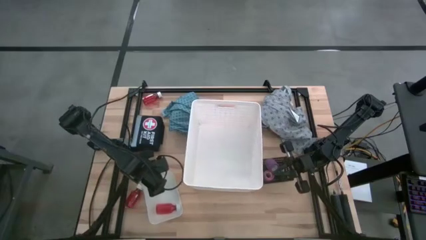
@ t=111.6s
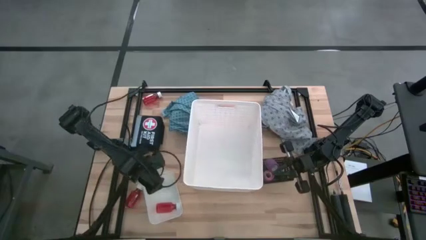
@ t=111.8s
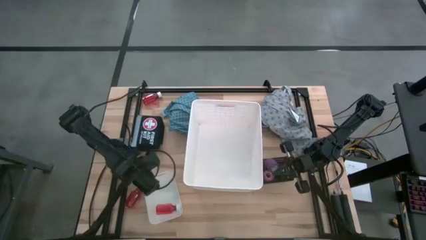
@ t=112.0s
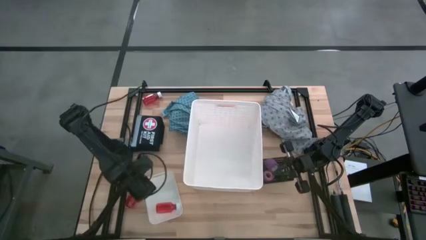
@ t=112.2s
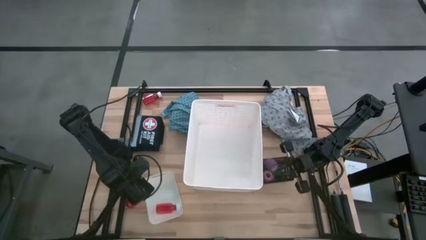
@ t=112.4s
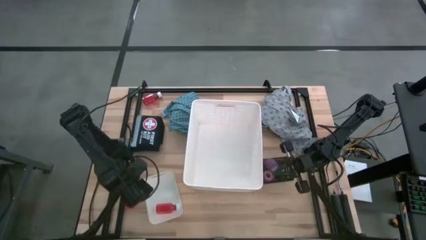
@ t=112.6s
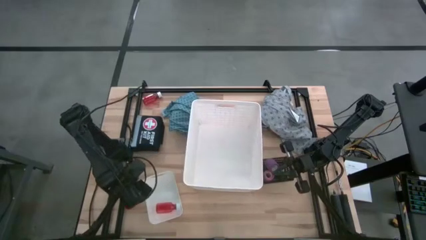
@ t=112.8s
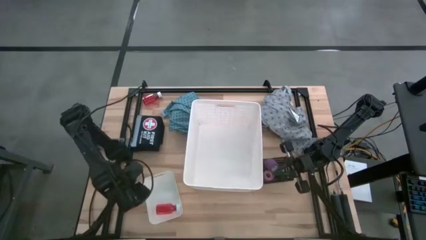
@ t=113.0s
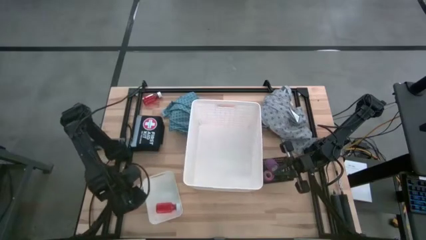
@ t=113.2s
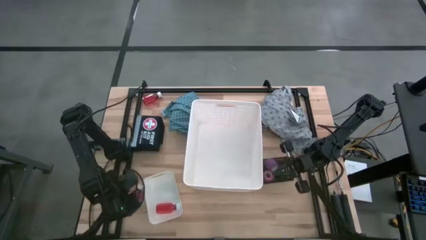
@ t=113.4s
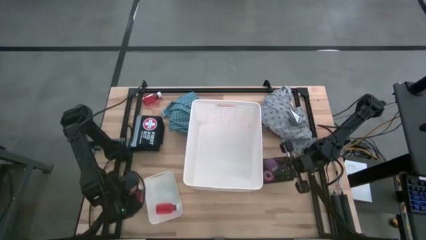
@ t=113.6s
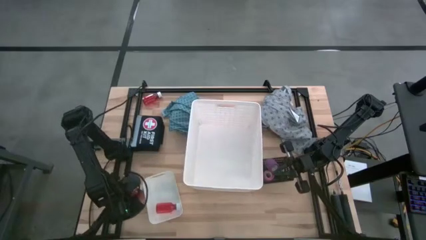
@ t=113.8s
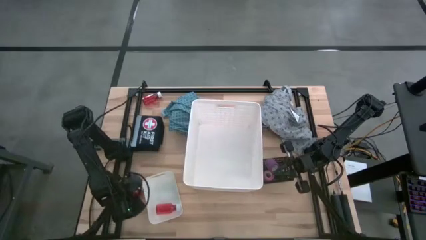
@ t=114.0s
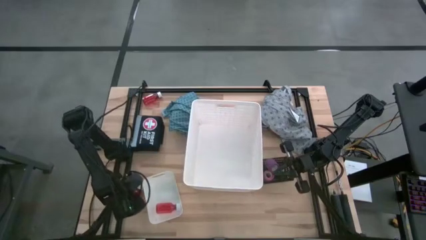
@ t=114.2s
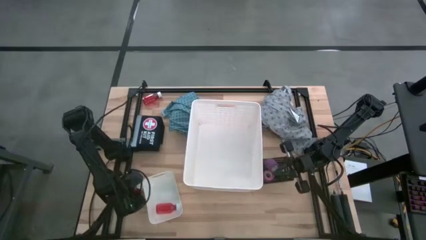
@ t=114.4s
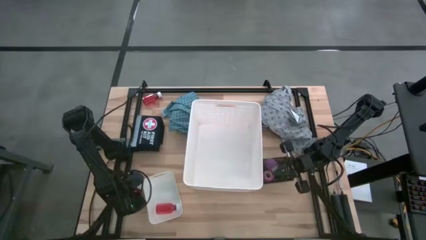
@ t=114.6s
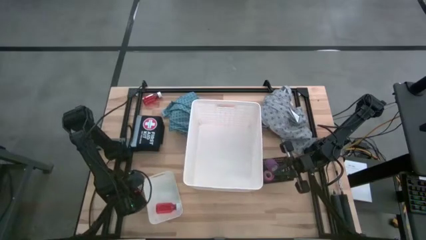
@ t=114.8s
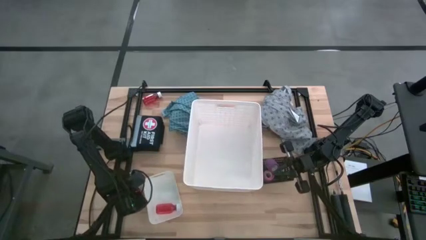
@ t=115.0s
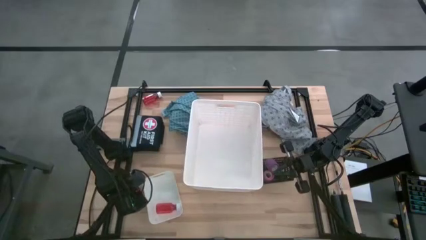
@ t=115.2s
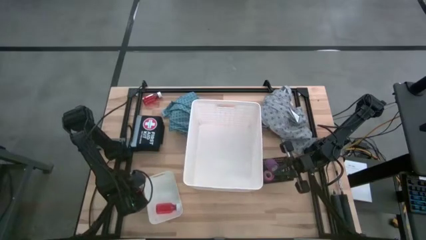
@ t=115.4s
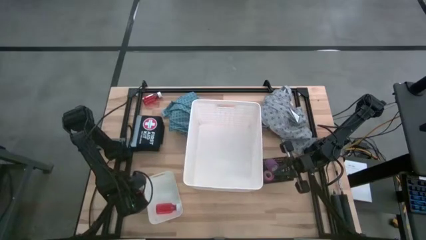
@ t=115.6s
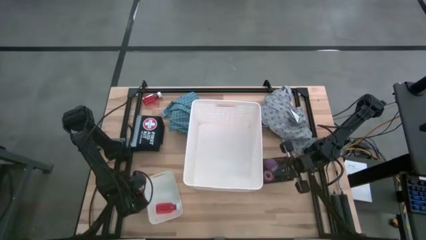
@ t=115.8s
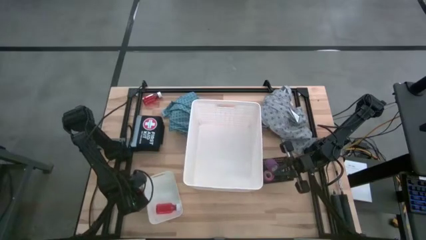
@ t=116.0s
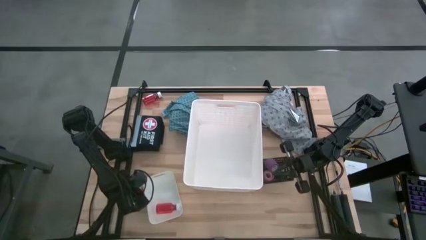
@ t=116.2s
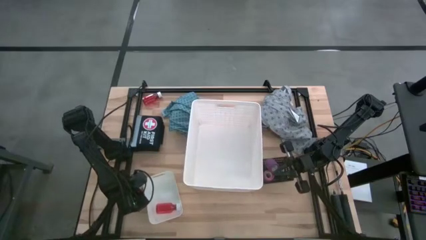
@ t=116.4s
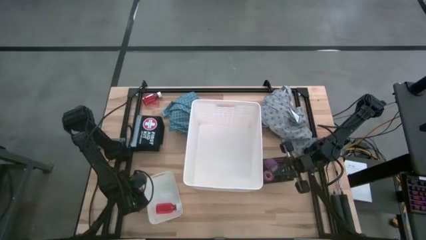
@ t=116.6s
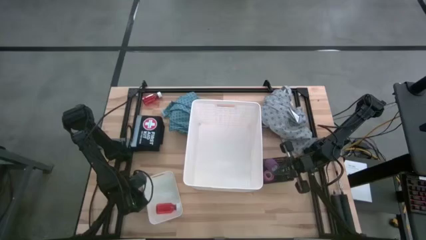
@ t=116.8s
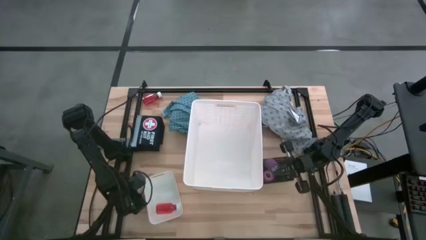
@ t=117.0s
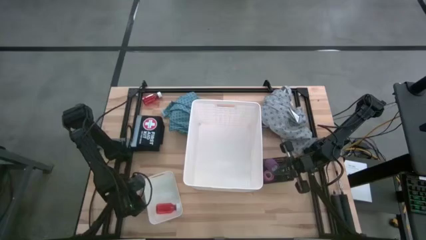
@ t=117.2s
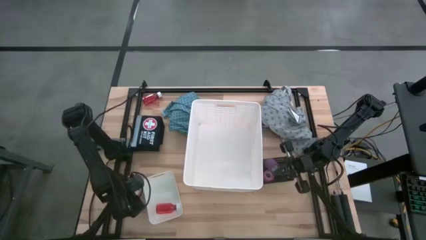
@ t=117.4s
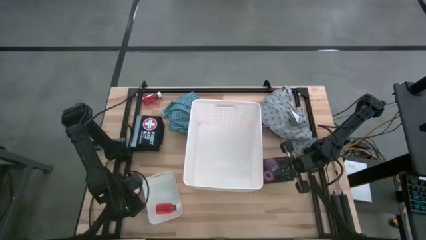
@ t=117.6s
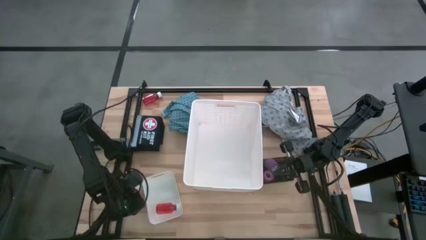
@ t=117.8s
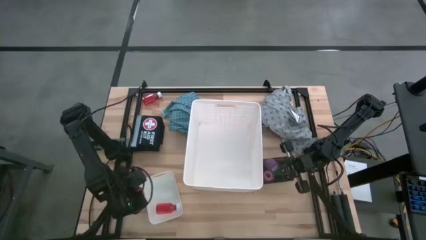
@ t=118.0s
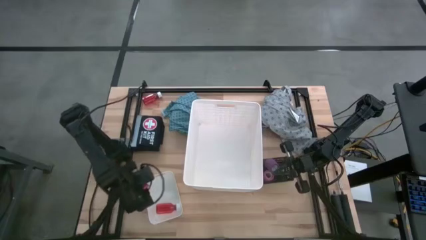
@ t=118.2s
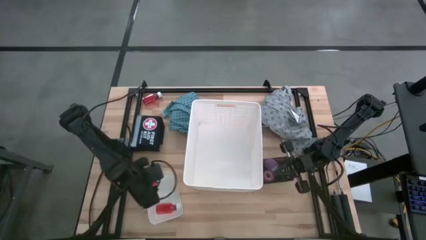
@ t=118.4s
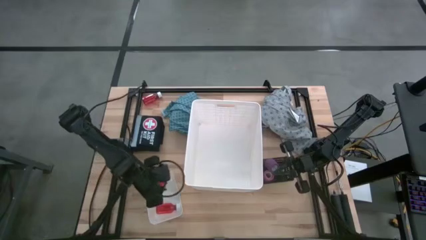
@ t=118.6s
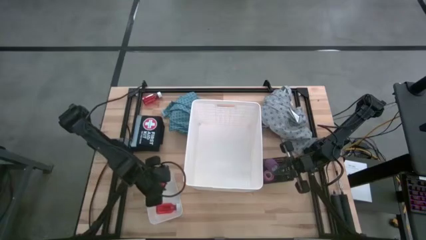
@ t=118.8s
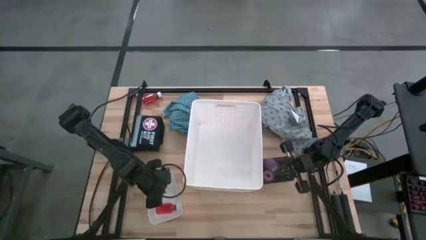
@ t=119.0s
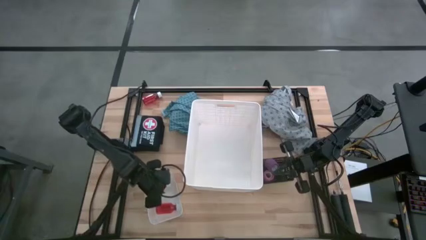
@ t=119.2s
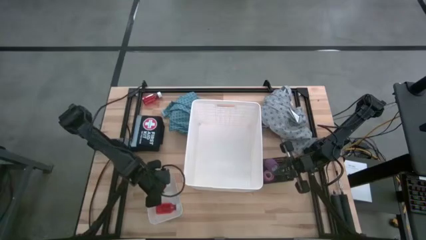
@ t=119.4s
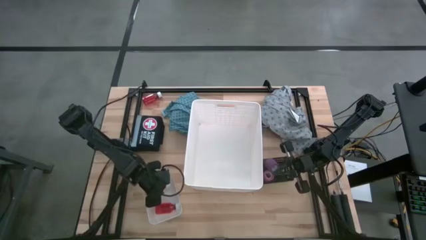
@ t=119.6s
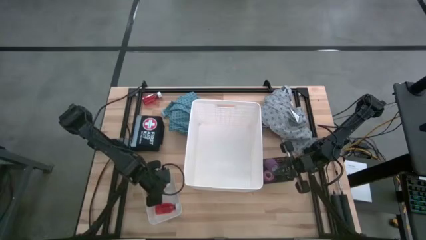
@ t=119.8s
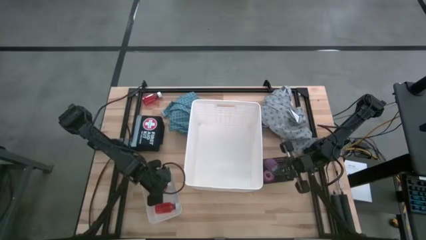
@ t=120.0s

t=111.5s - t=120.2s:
Task: Pick & place medical supplies in basket/bin
Put the bottom orange bottle into the white bin

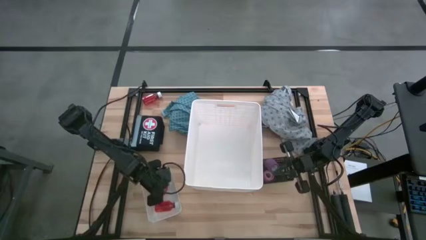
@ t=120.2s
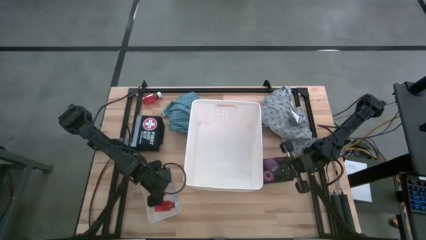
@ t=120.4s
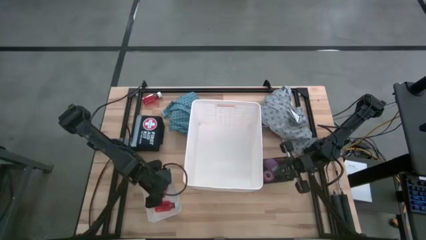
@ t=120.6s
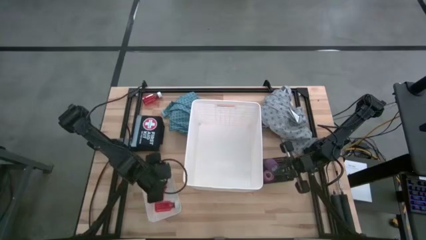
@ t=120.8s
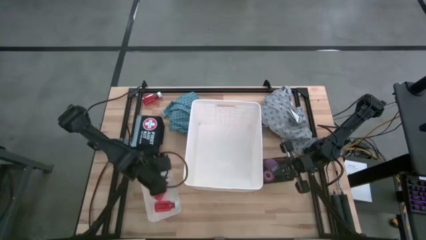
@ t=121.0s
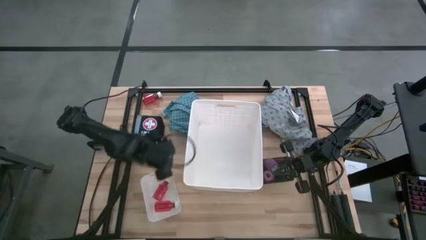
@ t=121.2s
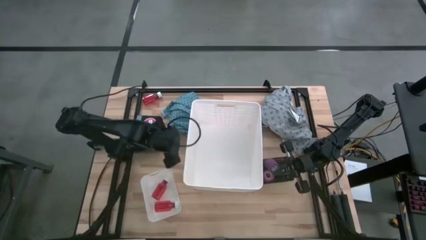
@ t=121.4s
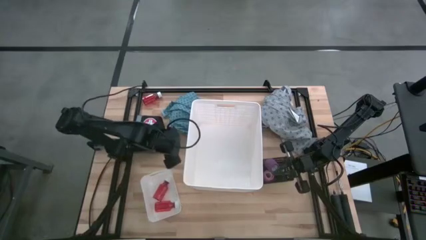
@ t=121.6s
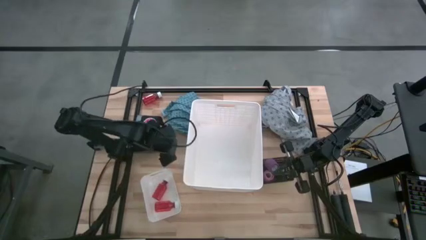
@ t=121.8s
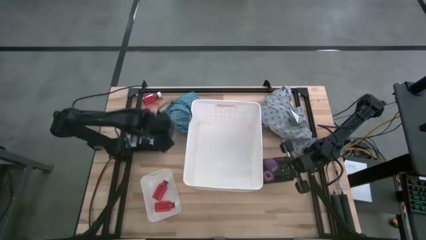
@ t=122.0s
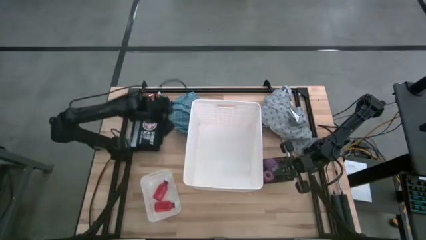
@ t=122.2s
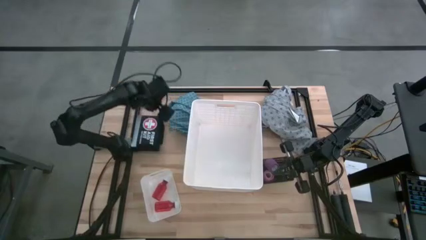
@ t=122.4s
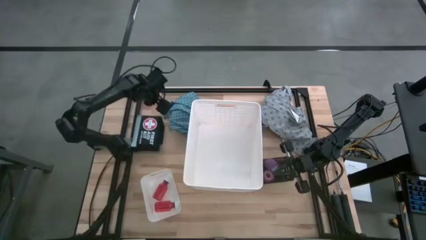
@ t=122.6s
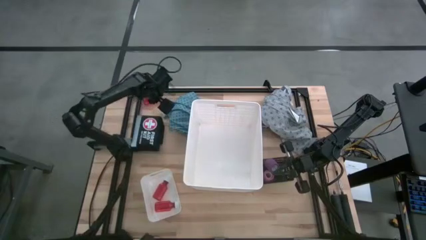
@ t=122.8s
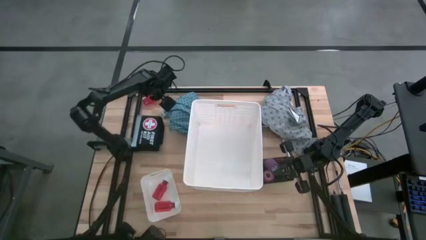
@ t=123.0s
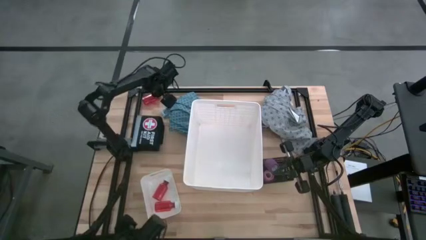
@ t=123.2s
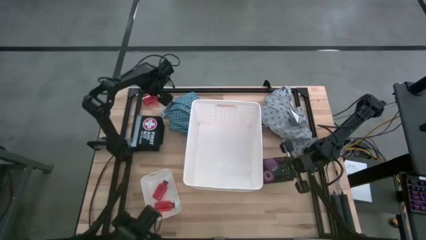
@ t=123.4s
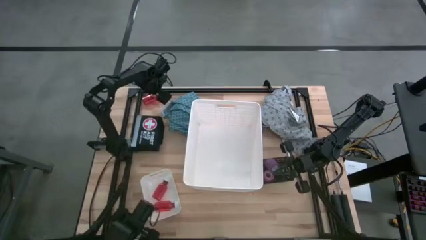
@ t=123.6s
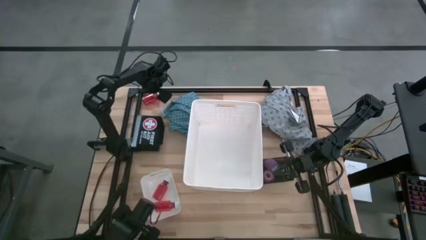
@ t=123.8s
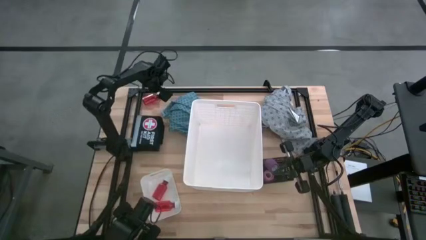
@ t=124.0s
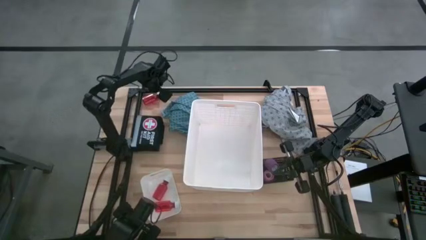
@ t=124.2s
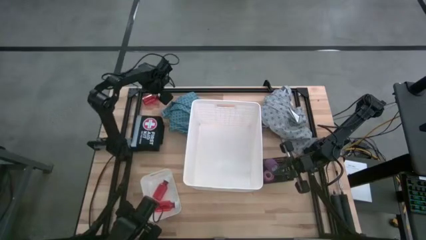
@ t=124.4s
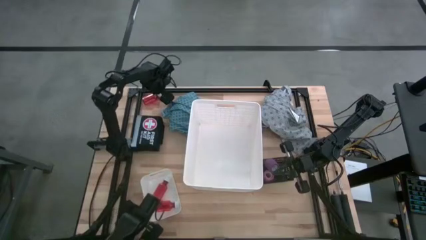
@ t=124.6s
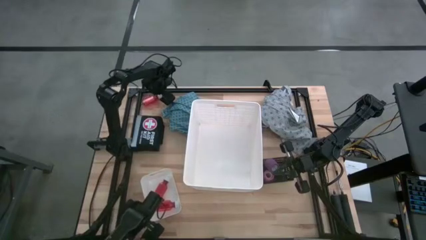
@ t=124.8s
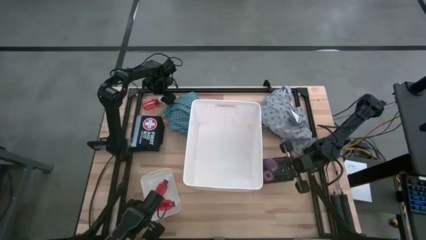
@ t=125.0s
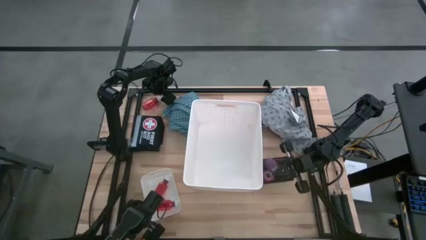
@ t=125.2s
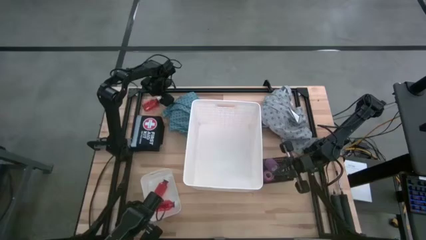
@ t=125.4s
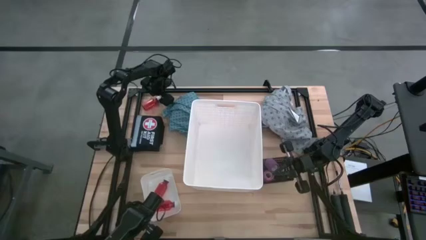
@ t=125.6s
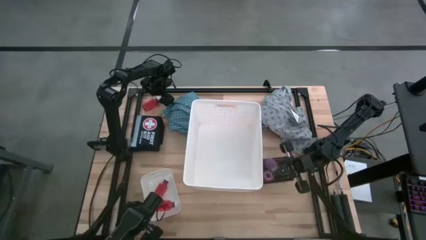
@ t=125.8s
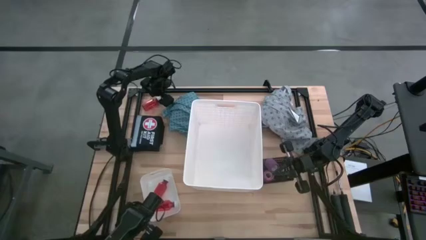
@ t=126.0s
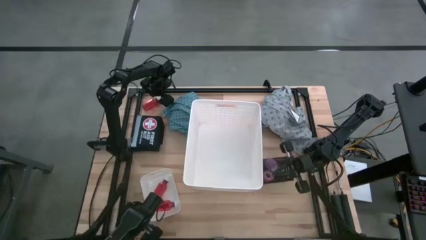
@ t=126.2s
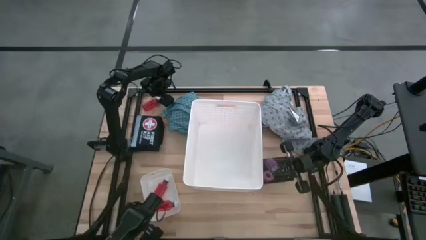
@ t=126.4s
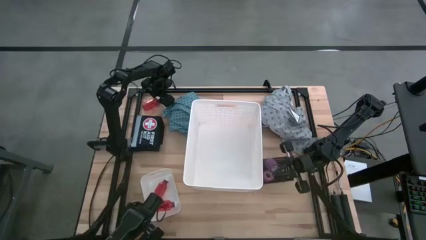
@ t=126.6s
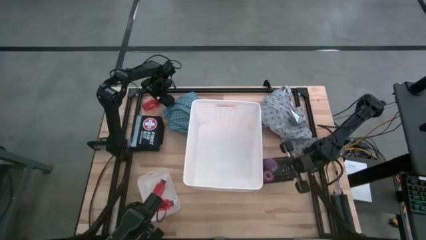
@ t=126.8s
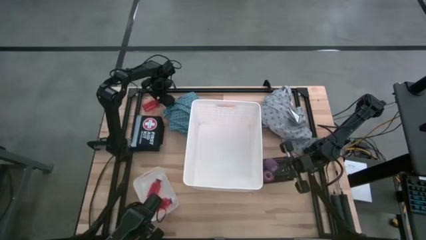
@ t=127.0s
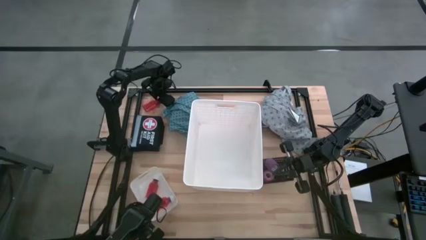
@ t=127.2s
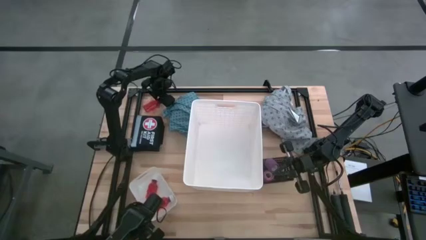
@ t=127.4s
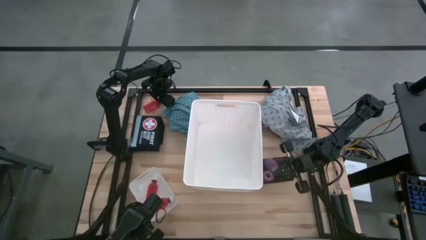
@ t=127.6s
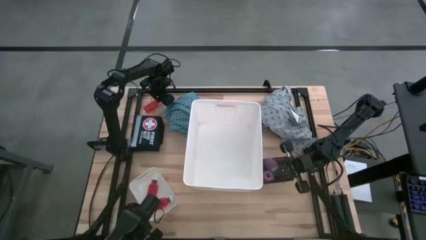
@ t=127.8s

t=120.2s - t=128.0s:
Put the orange bottle into the white bin
